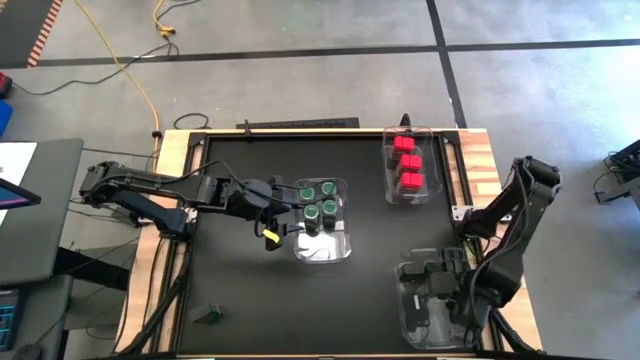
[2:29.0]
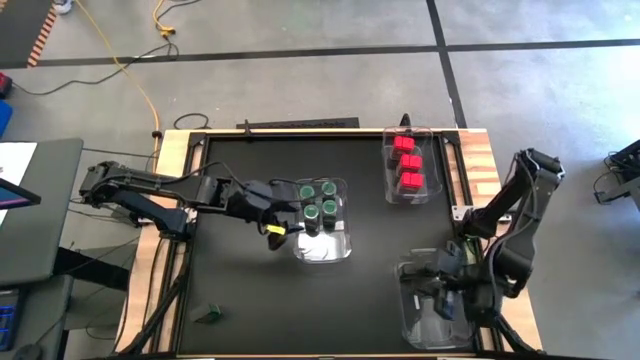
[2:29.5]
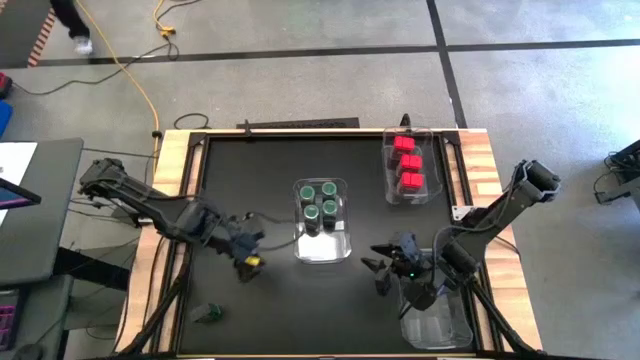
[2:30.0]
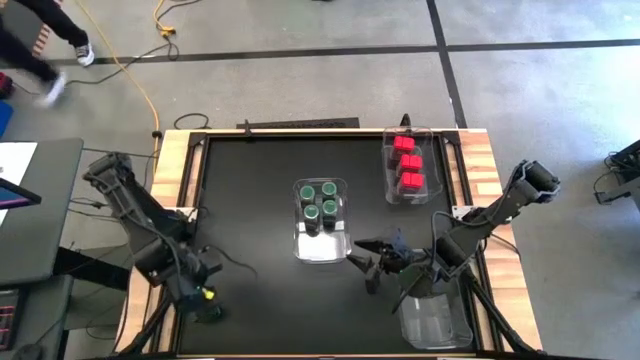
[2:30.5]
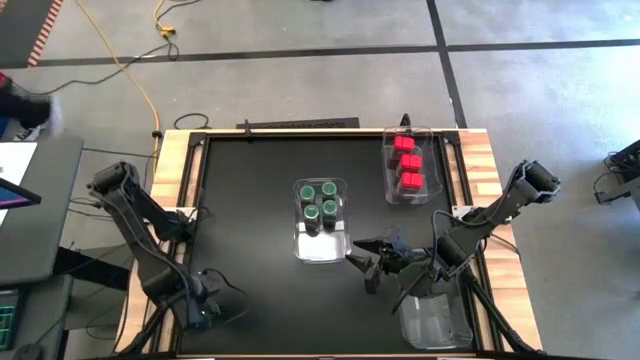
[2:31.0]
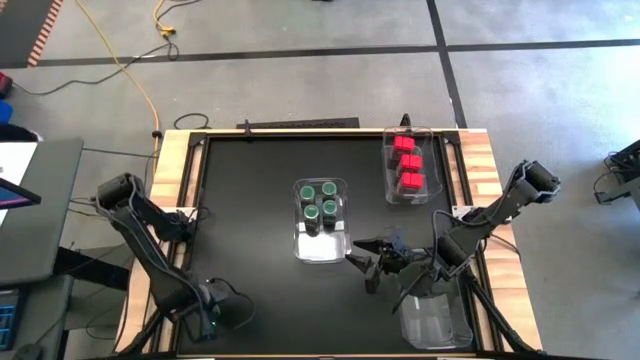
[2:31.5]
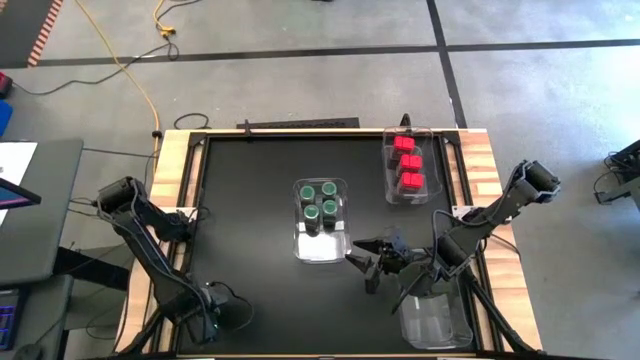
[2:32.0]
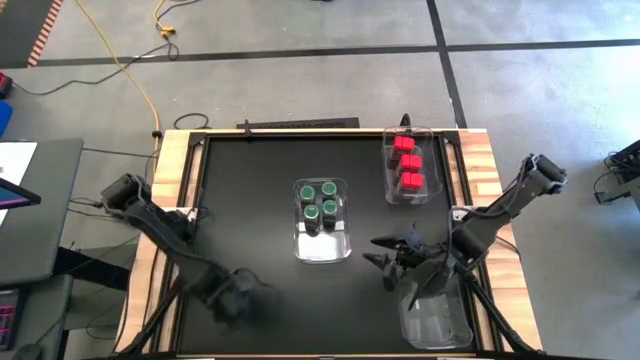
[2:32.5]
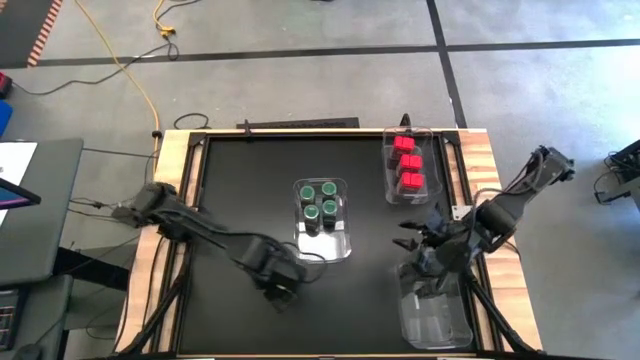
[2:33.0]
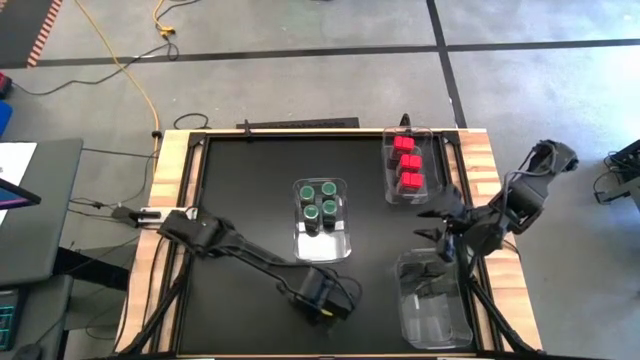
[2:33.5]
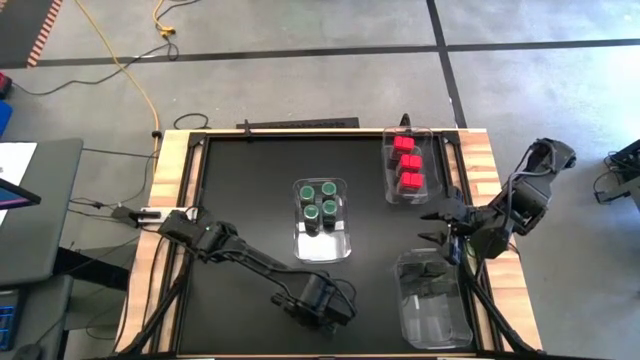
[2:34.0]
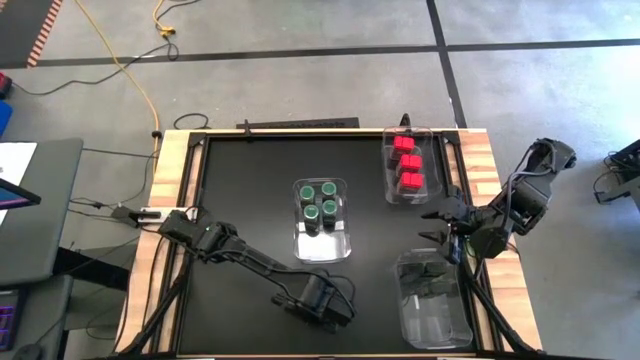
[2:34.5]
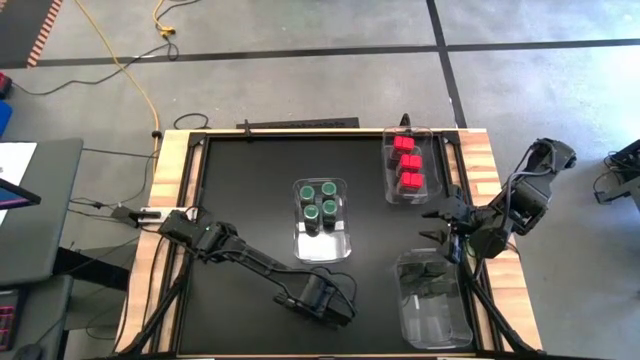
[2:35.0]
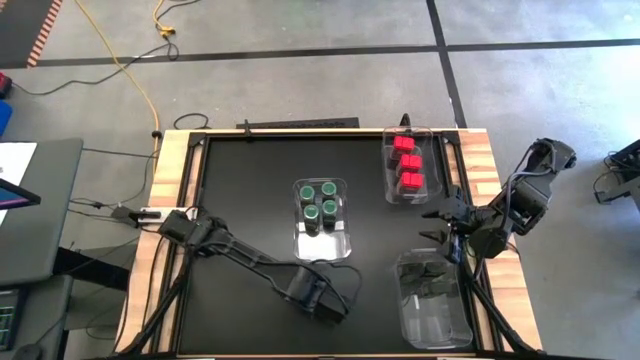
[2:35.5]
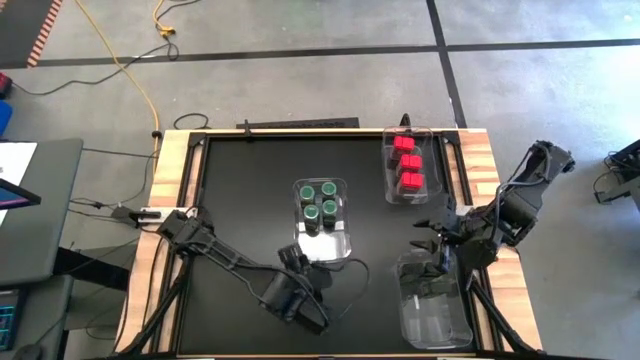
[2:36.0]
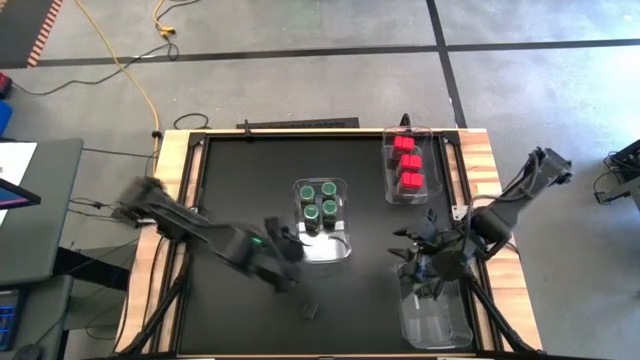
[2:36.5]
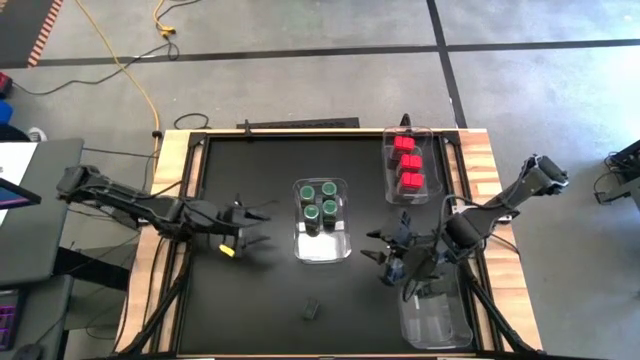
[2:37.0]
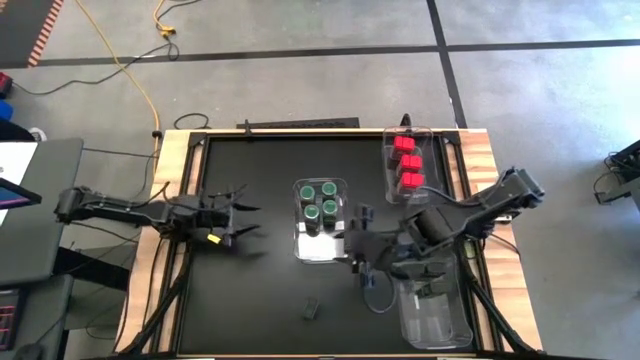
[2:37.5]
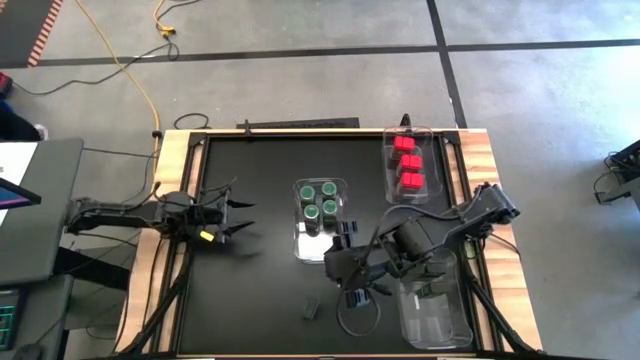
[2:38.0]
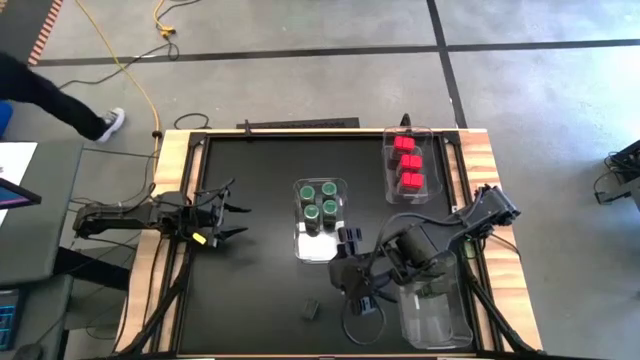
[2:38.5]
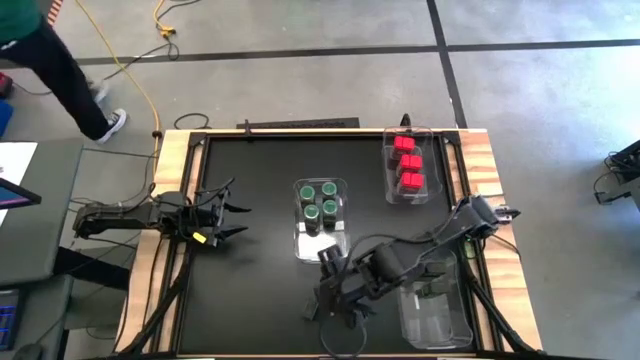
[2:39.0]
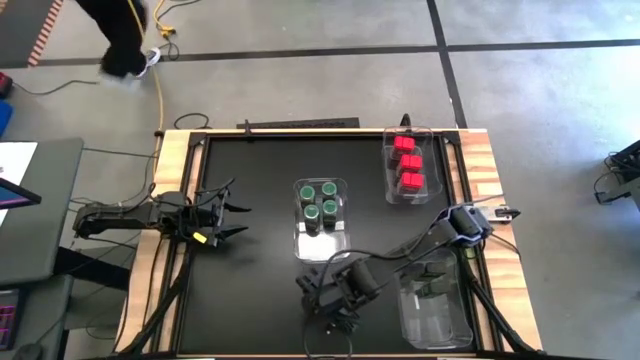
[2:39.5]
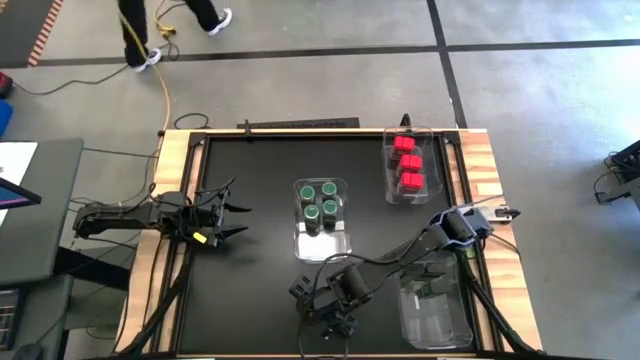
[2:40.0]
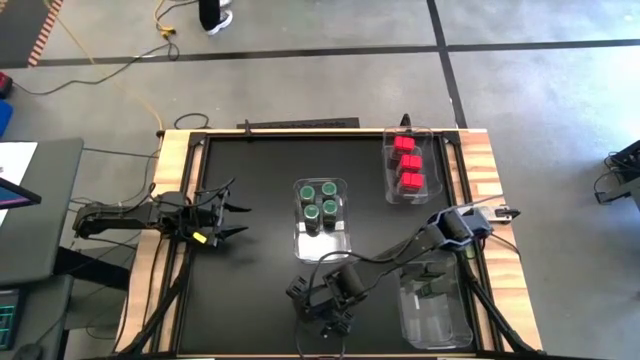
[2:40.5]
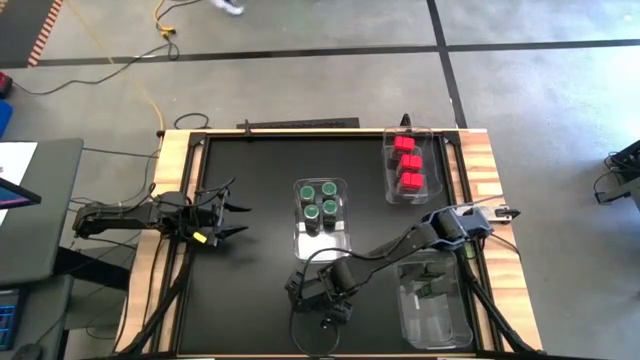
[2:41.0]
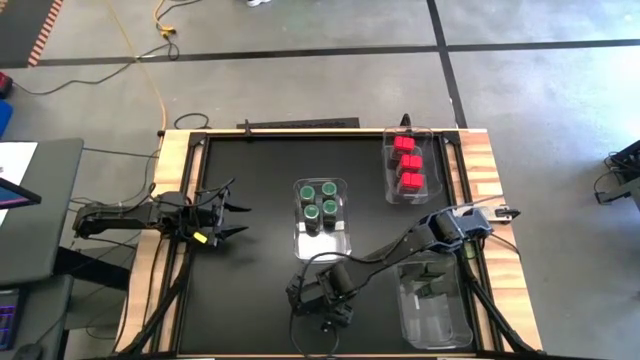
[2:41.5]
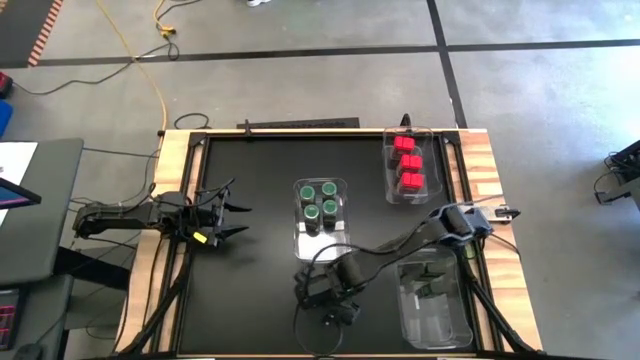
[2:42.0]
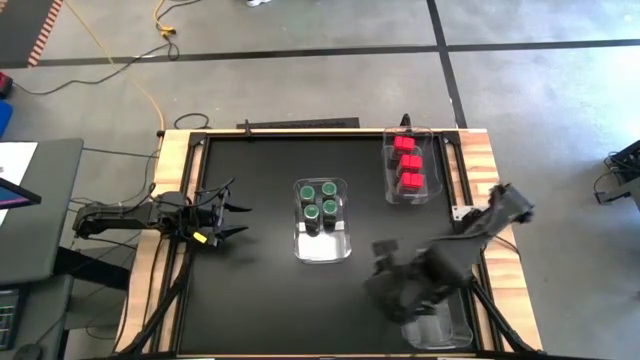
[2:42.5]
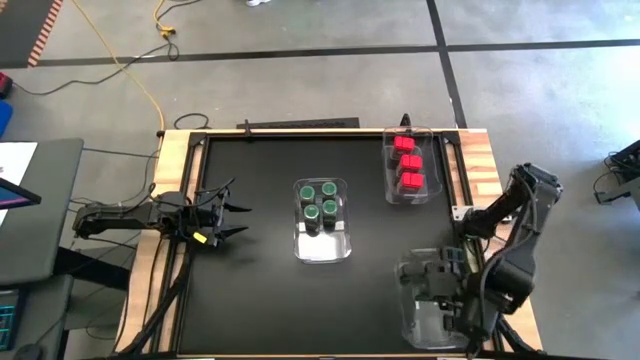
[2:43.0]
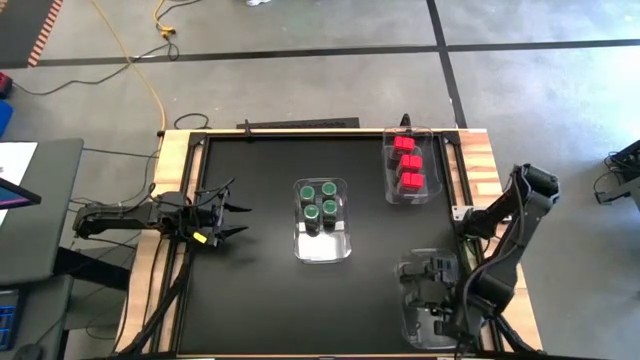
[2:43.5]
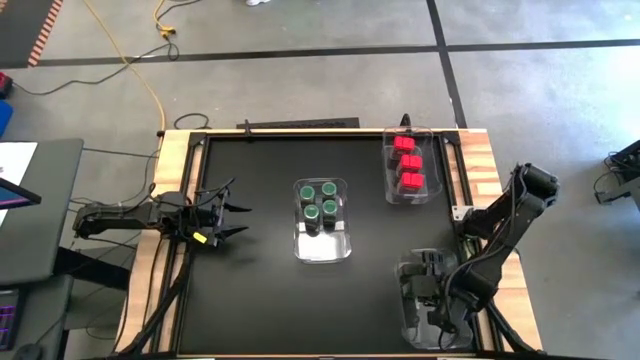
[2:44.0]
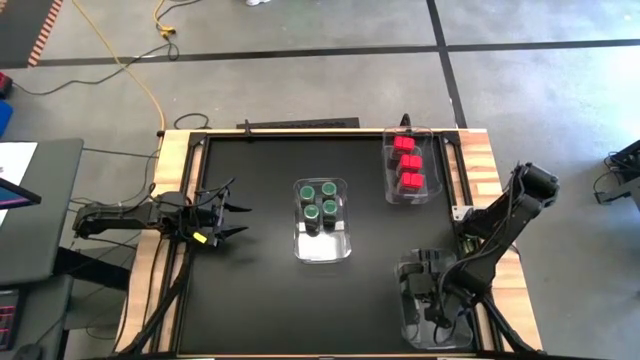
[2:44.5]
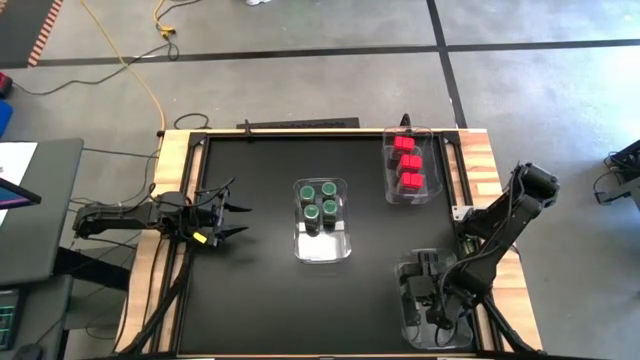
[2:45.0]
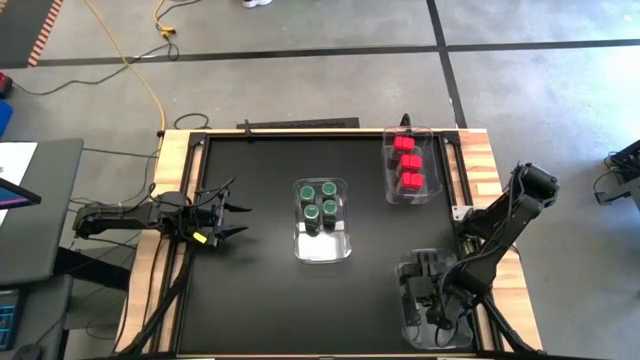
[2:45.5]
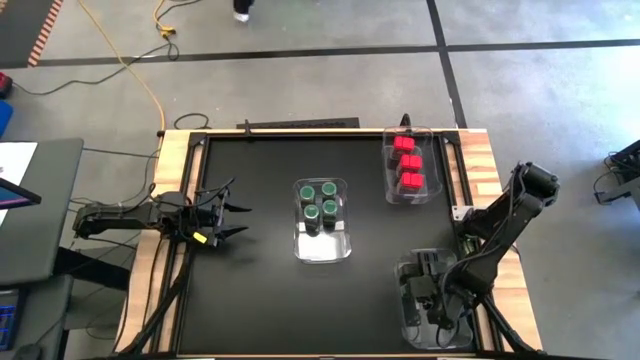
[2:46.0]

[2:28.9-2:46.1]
Task: Sort spices by type
Put the black seasoning can into the bottom transparent bin

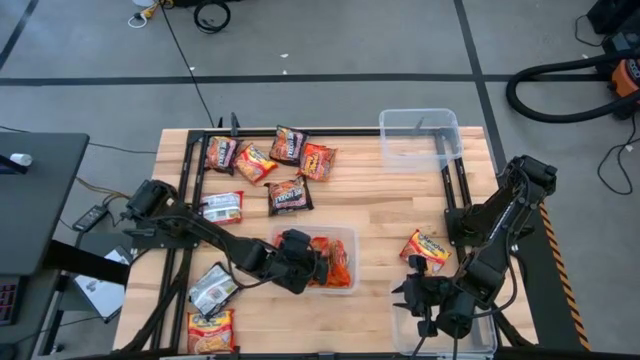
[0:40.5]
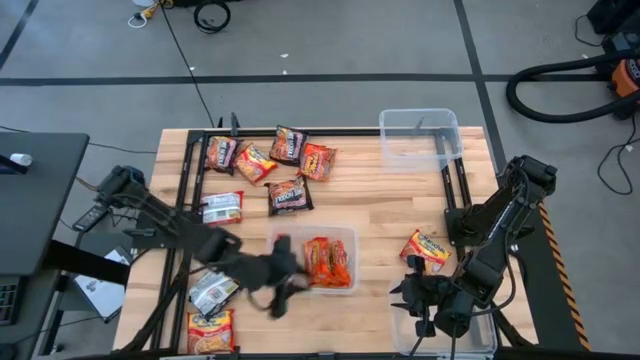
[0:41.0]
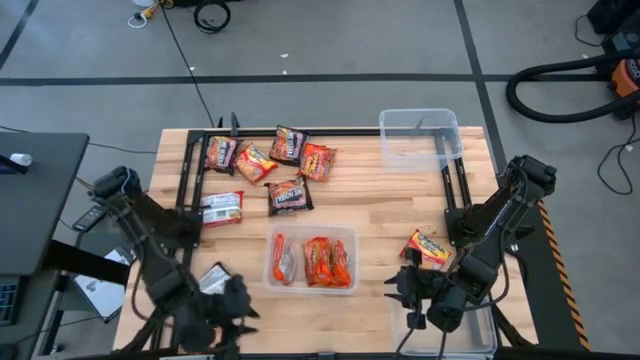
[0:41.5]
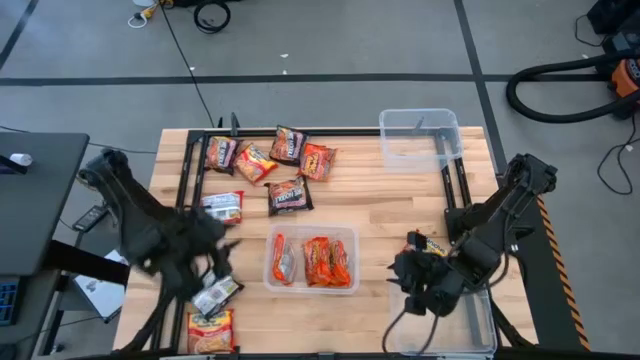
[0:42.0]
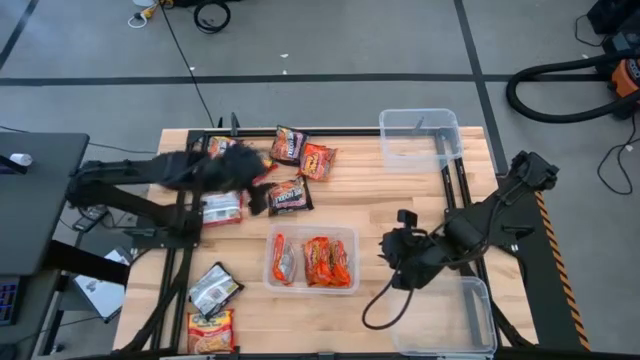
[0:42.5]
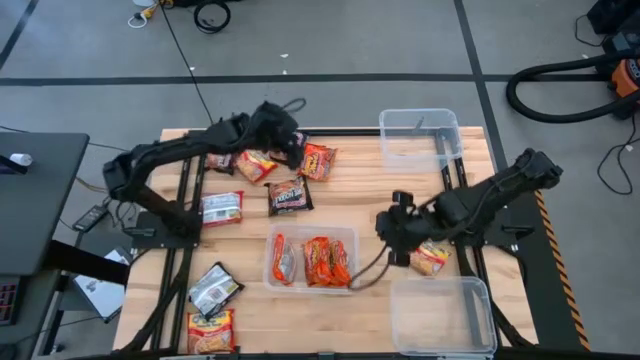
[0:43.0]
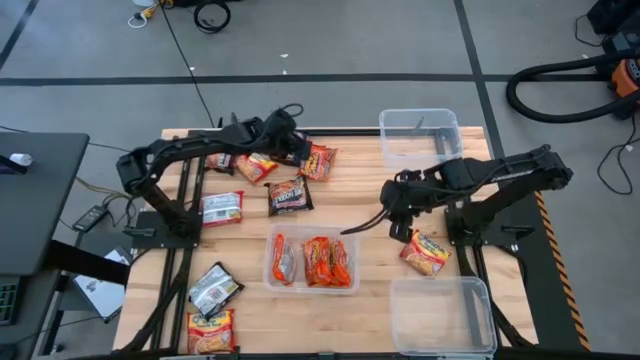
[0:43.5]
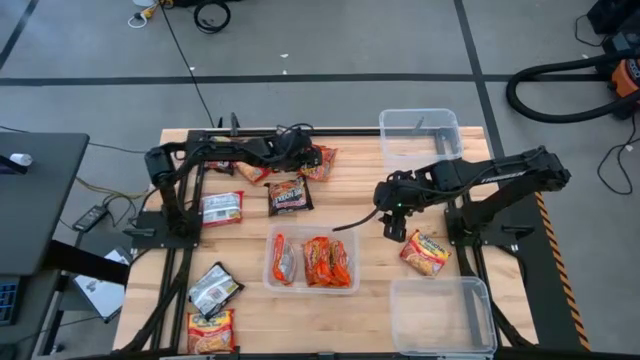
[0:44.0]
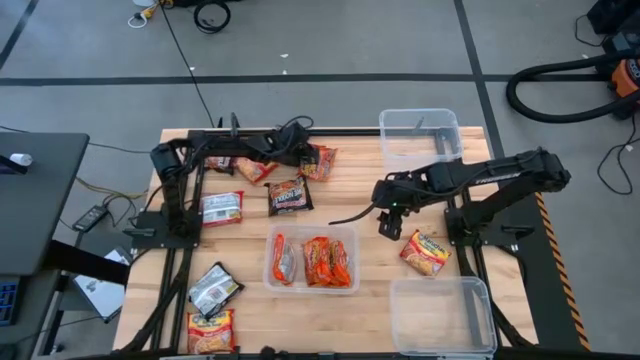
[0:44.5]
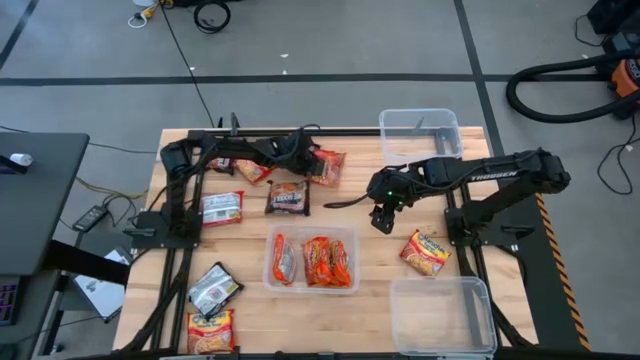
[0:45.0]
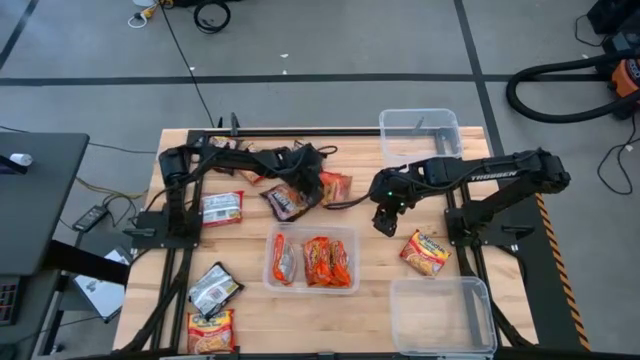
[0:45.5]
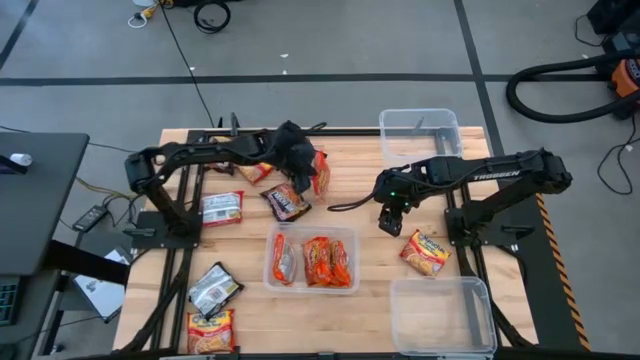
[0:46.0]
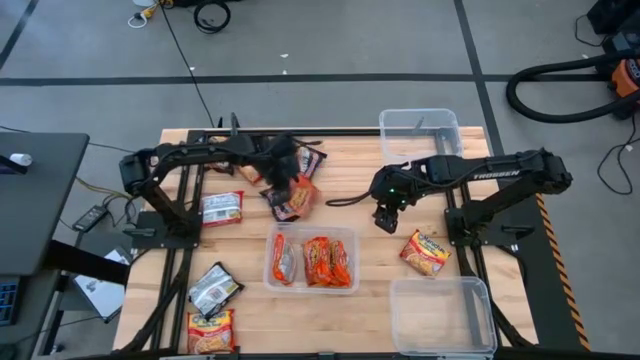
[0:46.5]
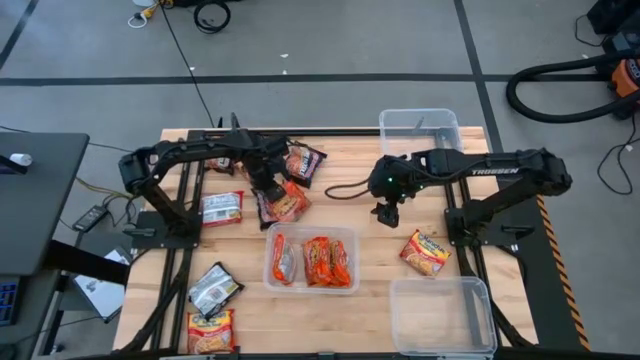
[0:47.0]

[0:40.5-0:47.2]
Task: Sort Maruchan noodles
Put the orange noodle pack into the bottom left transparent bin
